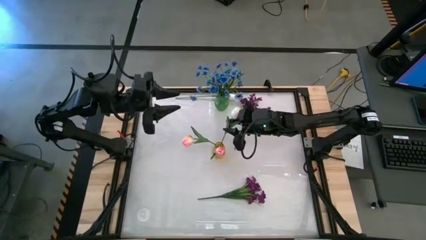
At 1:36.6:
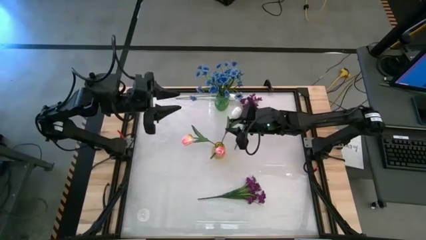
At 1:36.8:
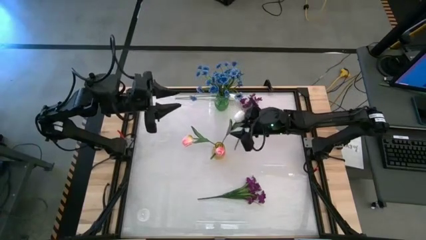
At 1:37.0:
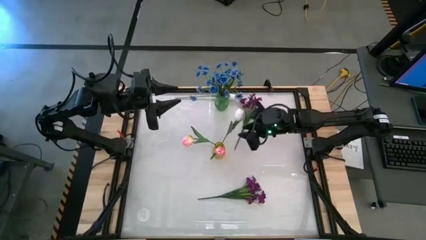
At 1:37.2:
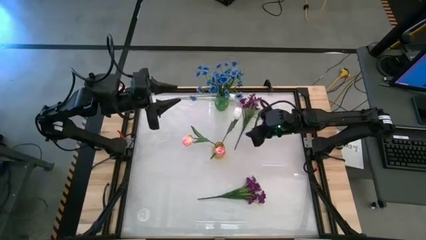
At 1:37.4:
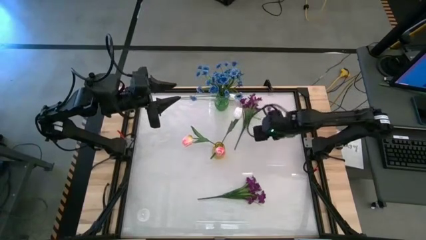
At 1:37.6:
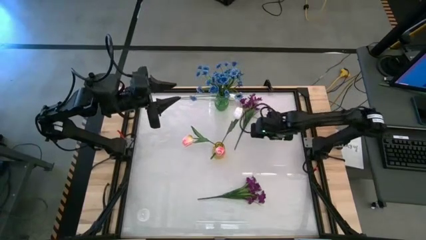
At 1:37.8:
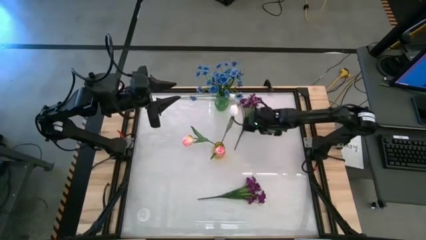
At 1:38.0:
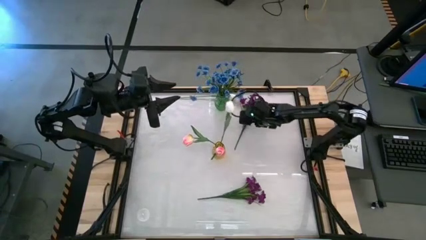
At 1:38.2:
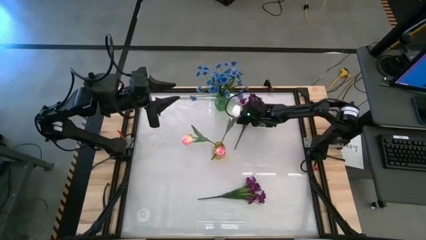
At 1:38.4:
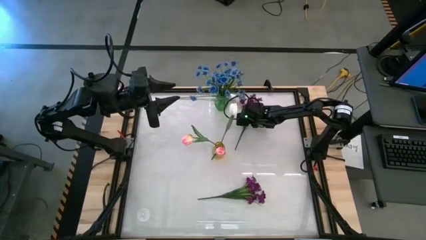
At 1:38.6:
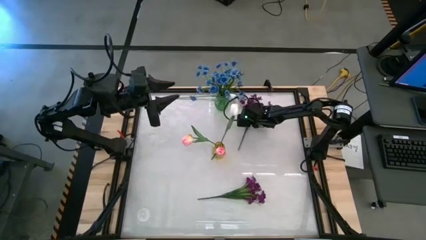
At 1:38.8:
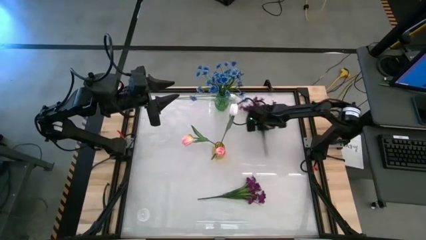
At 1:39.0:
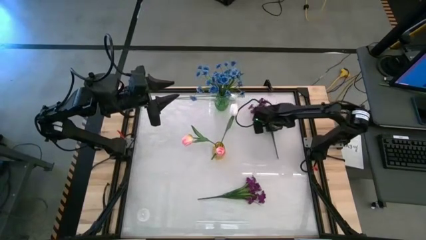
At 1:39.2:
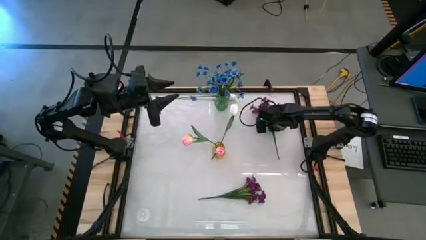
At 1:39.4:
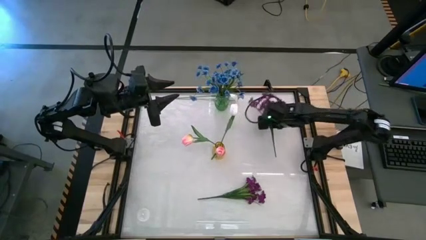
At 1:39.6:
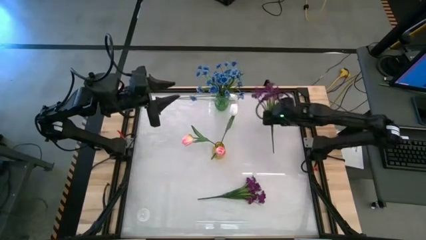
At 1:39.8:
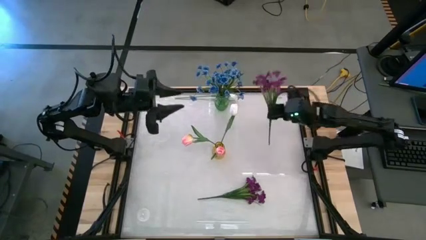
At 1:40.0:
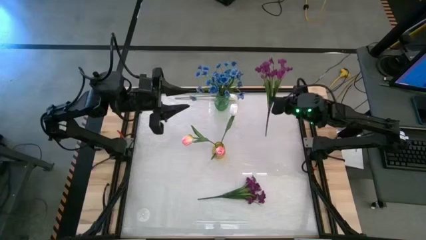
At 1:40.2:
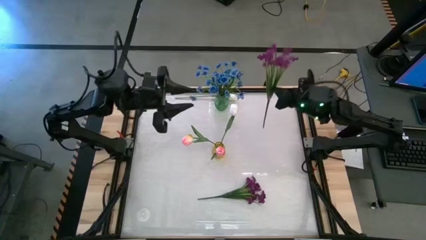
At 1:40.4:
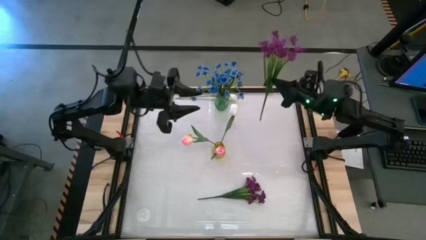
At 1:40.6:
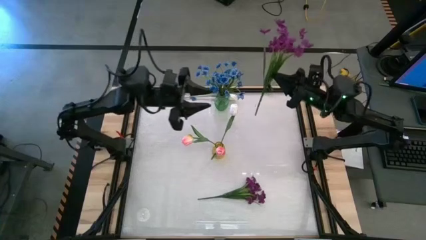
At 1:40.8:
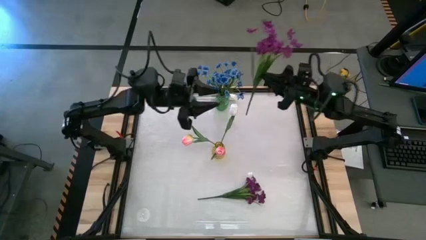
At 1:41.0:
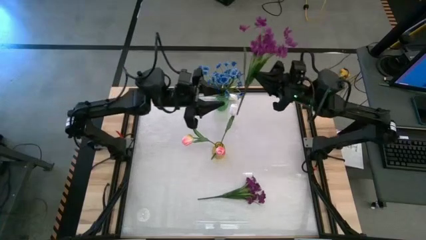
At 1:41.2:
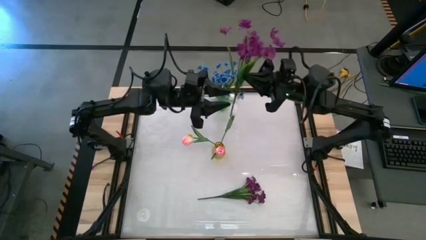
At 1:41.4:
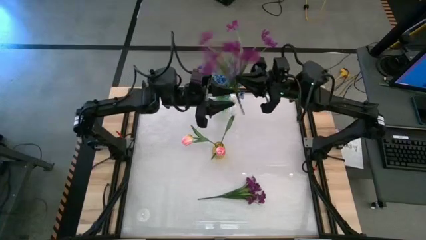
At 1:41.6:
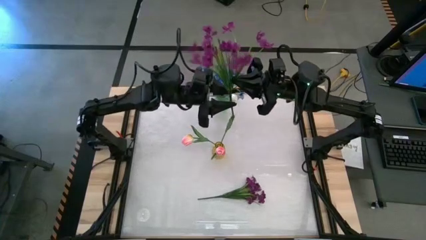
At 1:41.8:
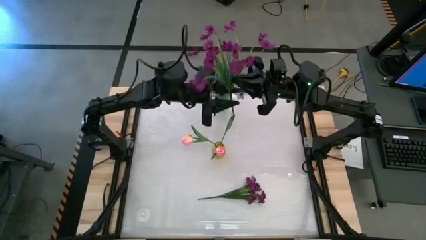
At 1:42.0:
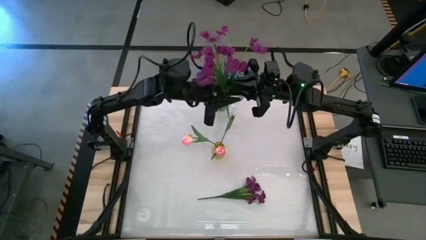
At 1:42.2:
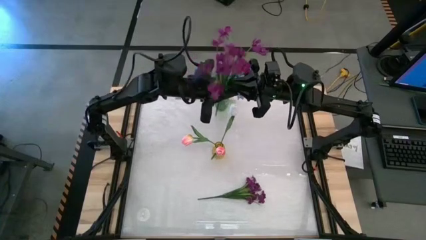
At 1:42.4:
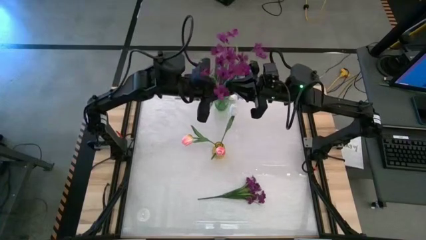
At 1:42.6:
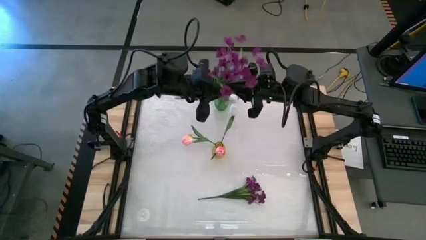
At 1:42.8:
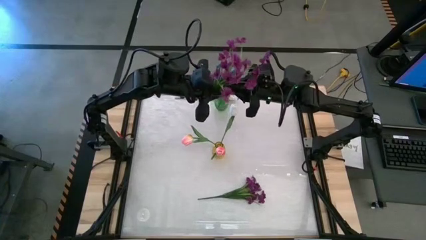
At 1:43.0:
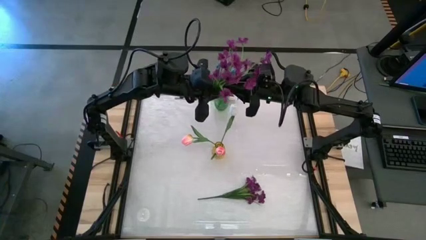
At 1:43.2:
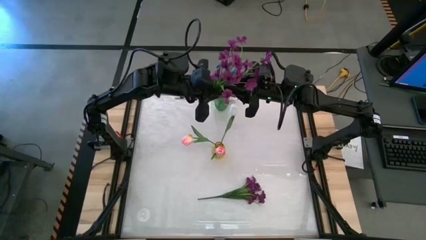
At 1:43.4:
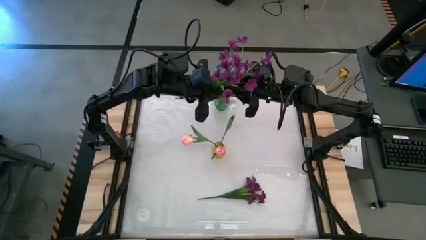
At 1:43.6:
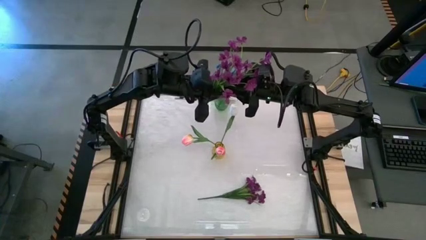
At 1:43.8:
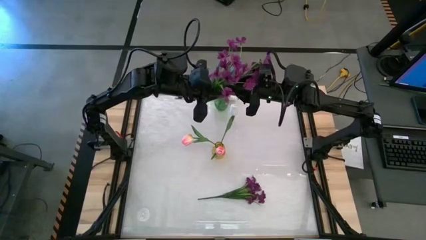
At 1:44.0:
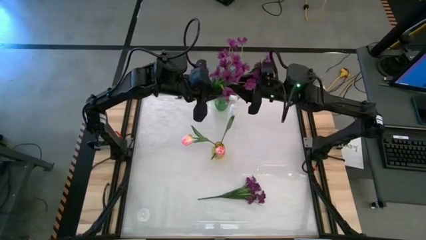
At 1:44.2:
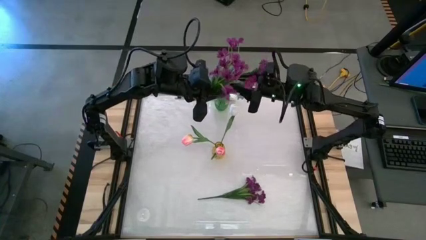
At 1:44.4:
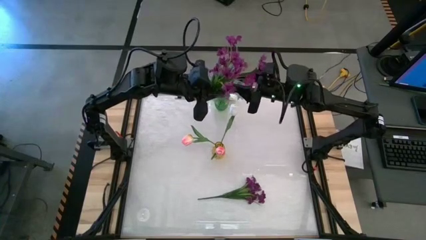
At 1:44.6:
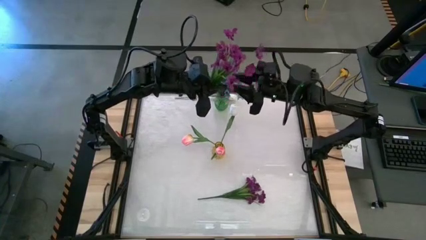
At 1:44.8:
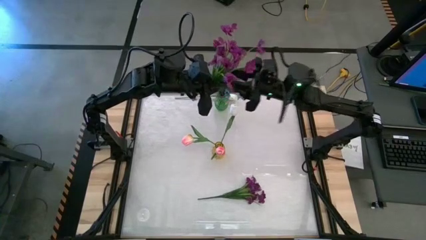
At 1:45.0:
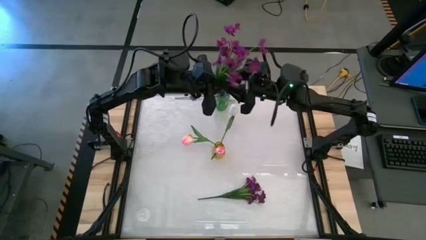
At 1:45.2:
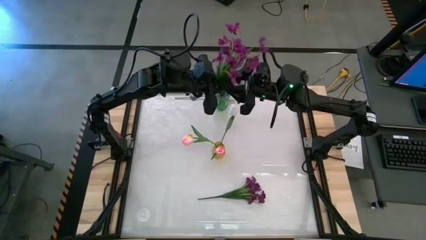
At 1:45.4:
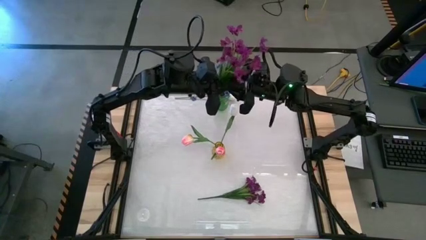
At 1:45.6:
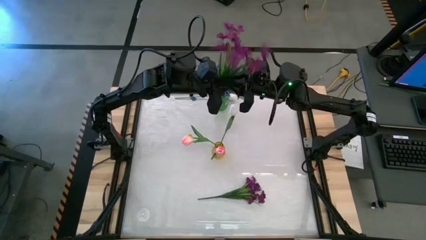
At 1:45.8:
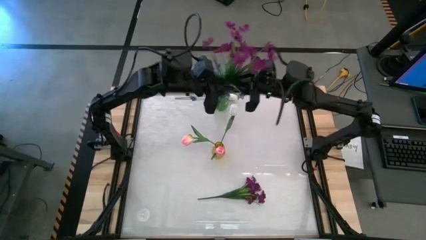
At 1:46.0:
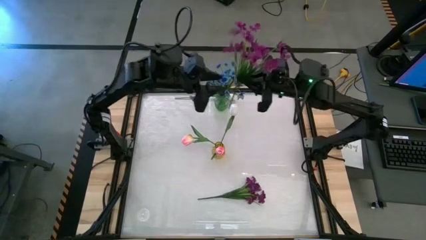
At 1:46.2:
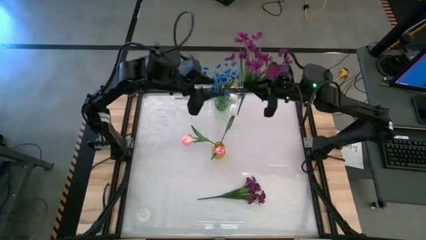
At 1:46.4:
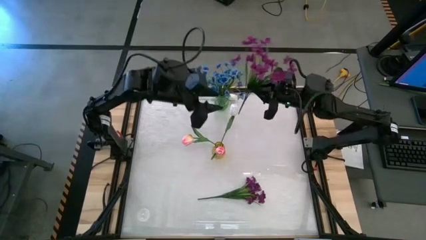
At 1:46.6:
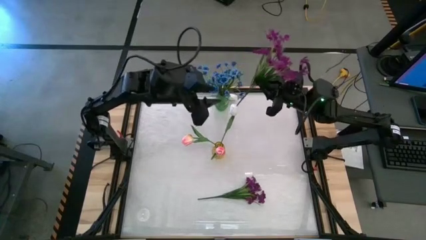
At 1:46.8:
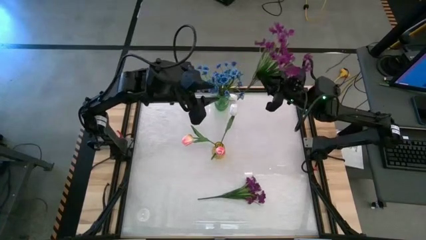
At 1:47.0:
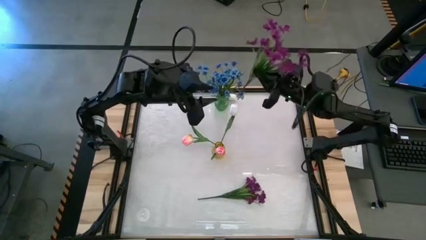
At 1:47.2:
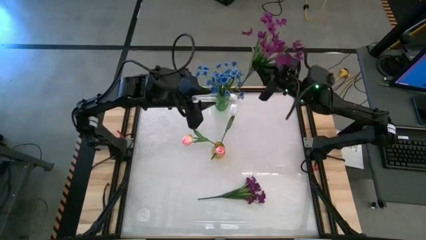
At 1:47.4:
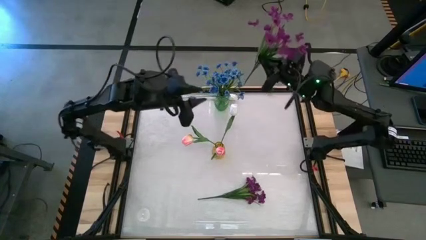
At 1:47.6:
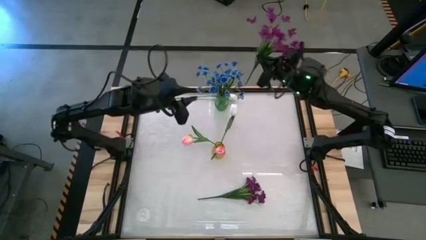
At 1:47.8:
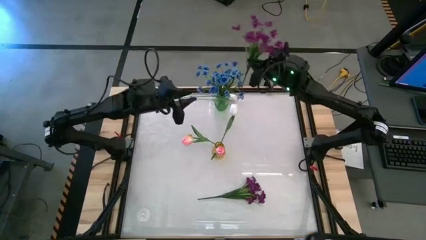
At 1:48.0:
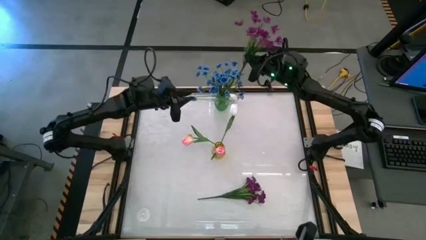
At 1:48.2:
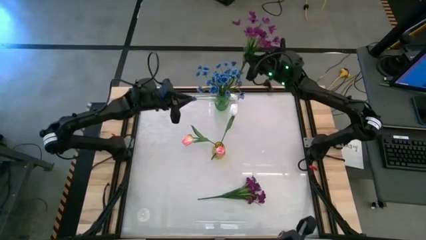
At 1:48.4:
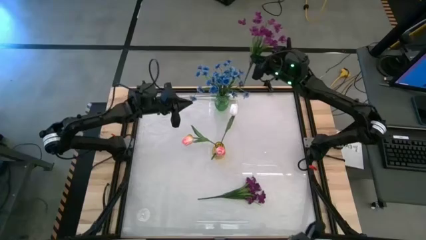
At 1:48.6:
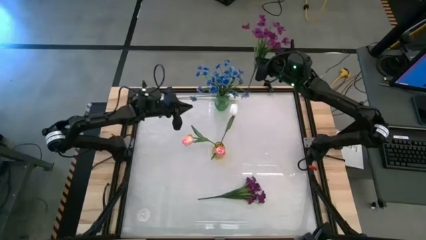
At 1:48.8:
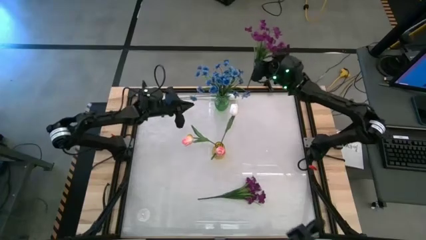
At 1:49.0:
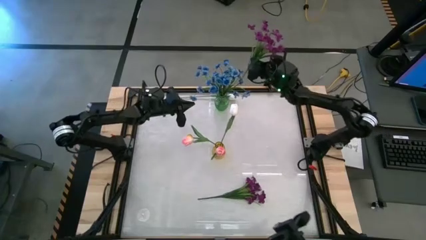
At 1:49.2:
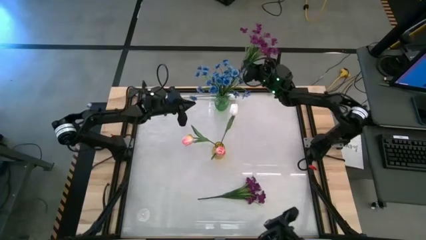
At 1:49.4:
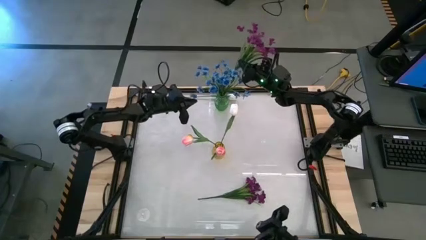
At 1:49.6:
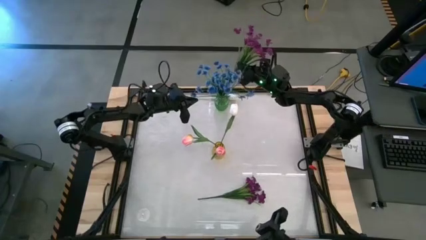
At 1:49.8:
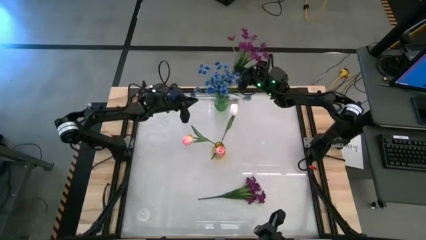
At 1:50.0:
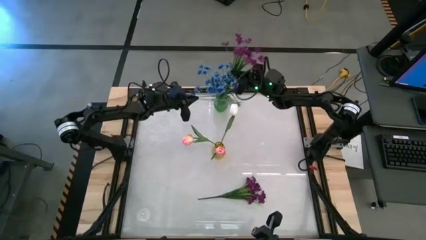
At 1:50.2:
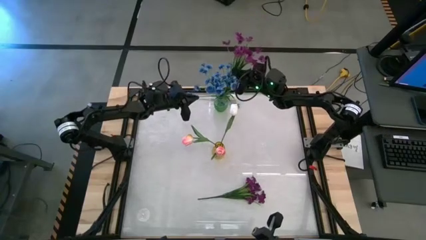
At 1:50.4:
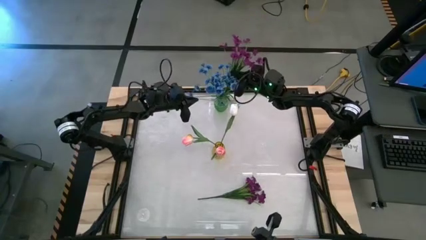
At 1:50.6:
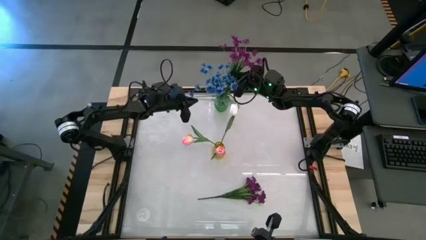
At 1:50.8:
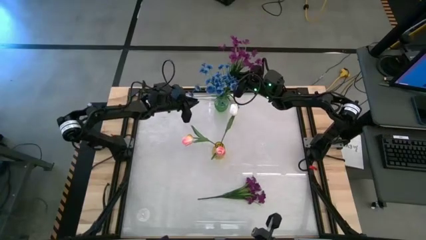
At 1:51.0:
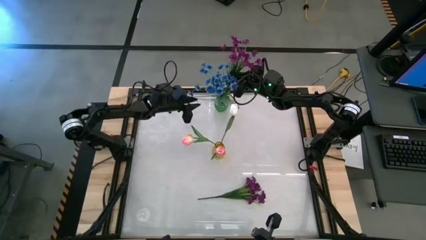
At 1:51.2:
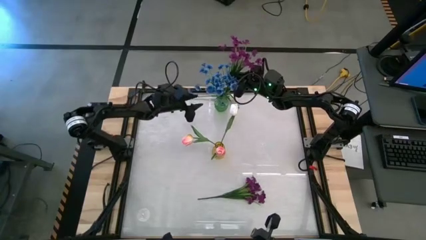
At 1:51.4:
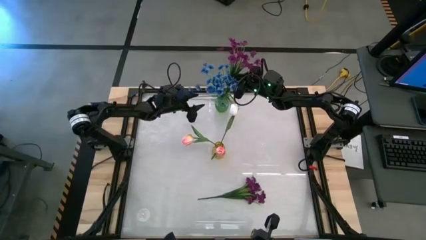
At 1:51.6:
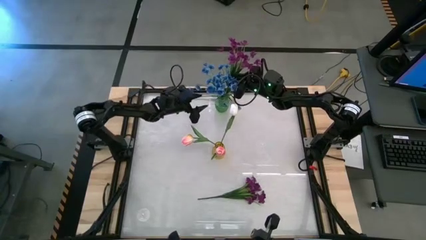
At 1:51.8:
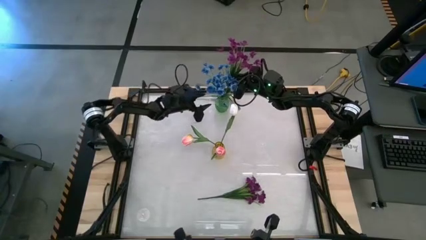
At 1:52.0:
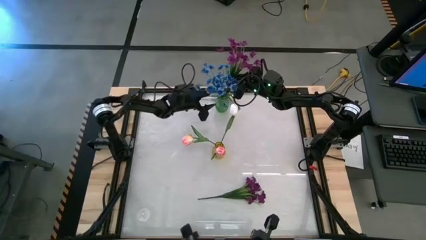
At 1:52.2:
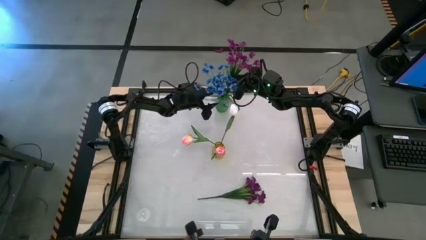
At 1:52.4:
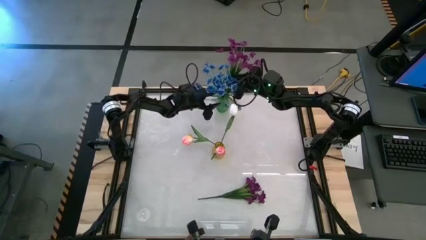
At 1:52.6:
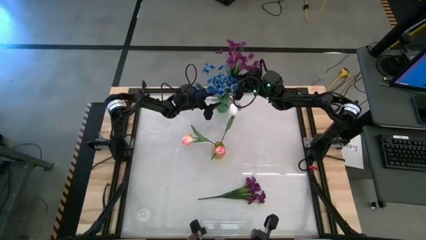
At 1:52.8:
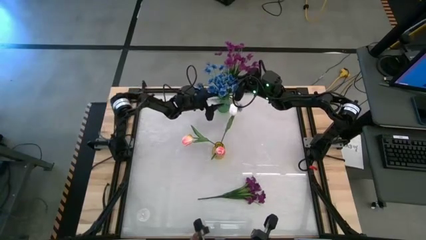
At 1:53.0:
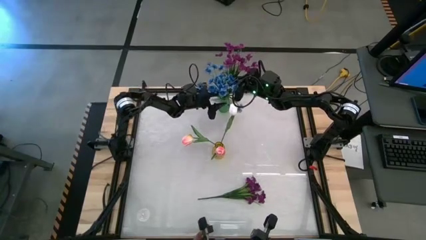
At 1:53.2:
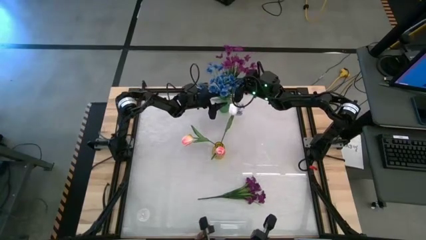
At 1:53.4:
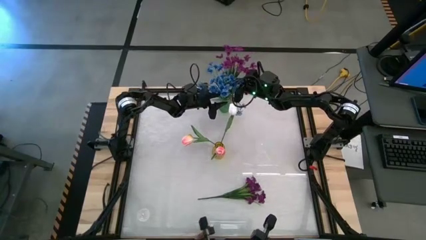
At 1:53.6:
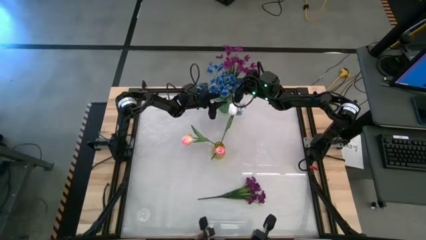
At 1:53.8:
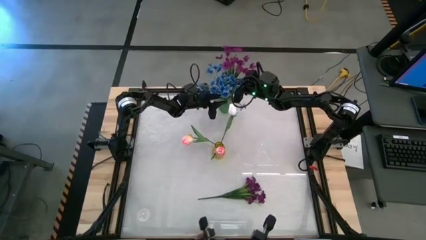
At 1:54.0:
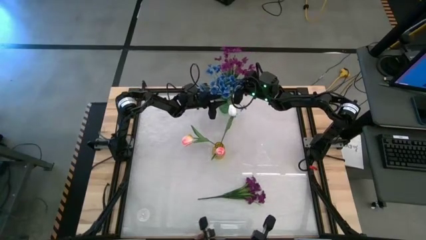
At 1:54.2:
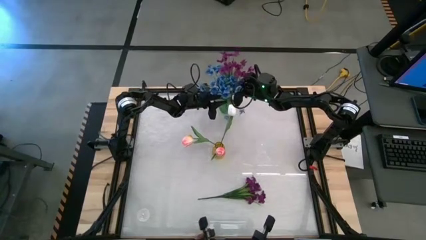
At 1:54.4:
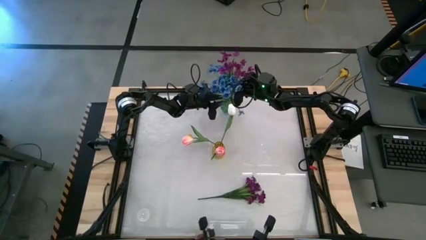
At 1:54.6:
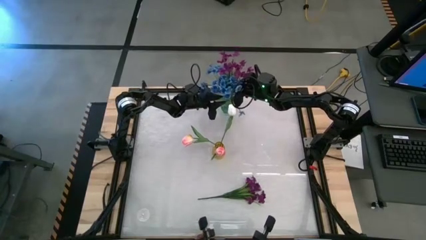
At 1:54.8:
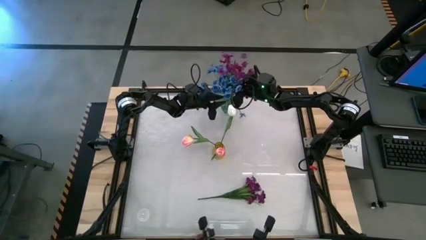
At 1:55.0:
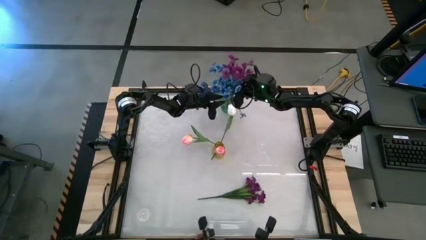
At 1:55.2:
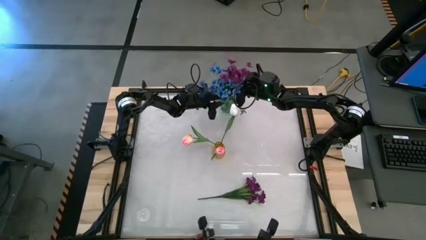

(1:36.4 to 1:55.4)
Task: Sort flowers into vase by color
Put the top purple flowers into the green vase
